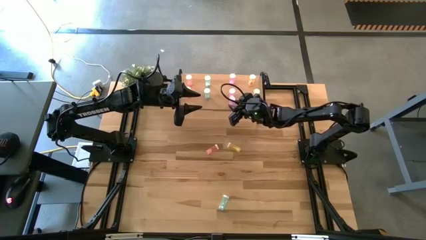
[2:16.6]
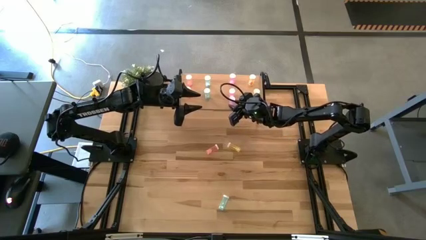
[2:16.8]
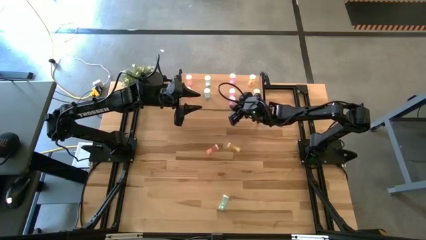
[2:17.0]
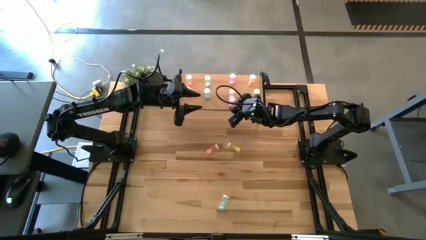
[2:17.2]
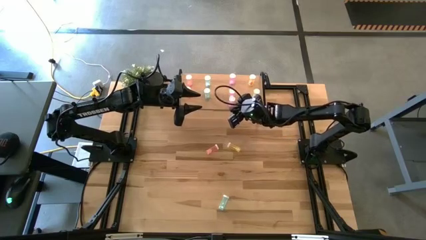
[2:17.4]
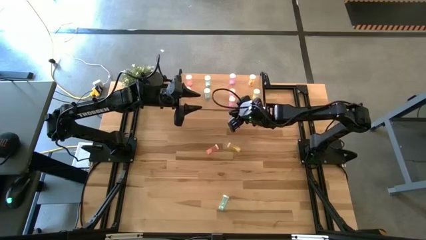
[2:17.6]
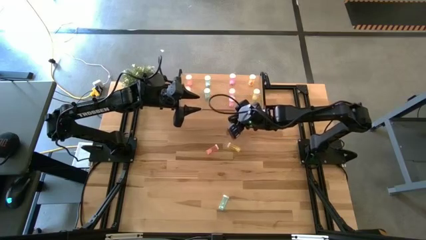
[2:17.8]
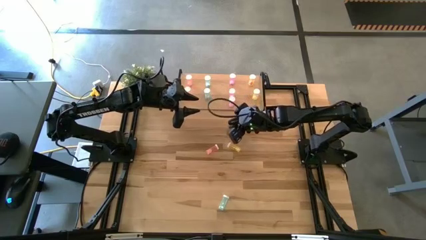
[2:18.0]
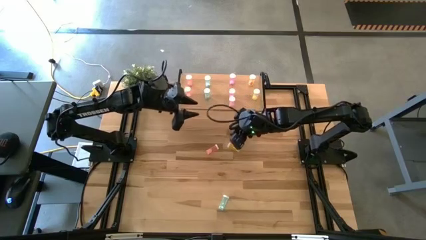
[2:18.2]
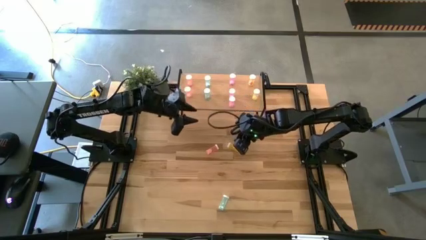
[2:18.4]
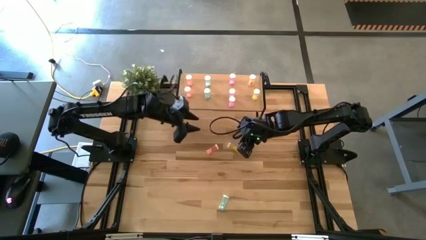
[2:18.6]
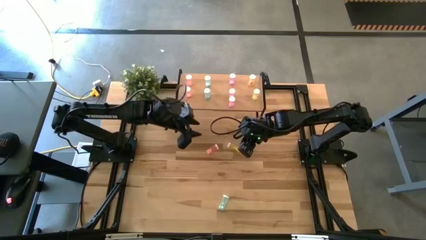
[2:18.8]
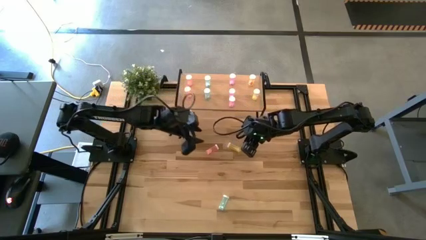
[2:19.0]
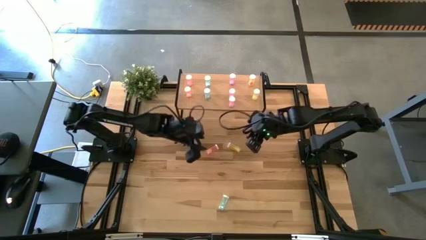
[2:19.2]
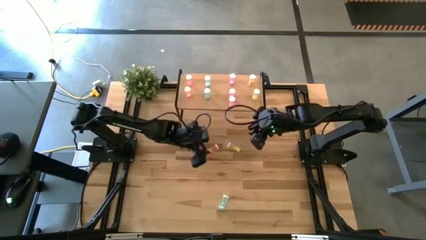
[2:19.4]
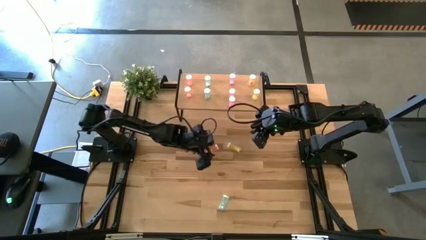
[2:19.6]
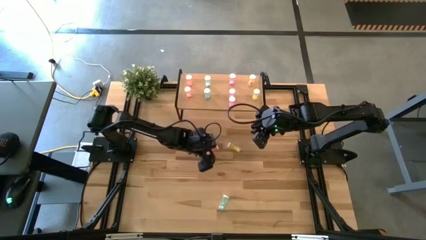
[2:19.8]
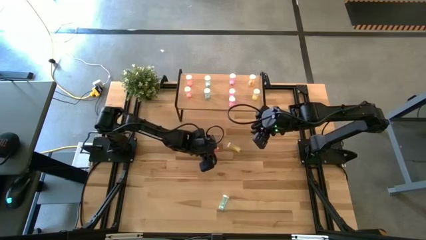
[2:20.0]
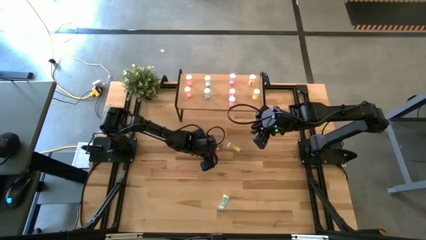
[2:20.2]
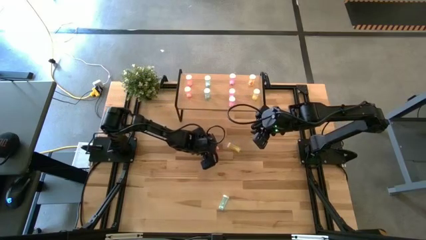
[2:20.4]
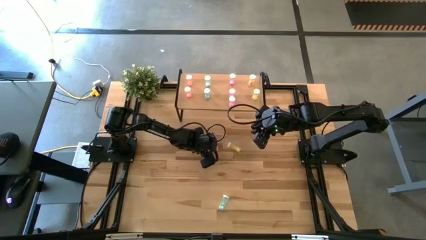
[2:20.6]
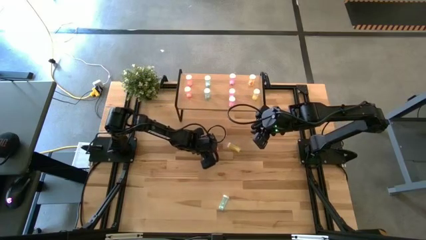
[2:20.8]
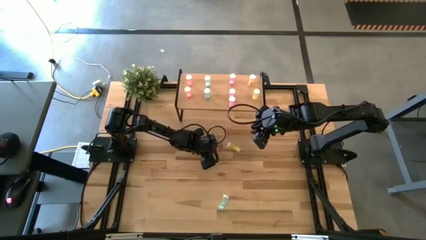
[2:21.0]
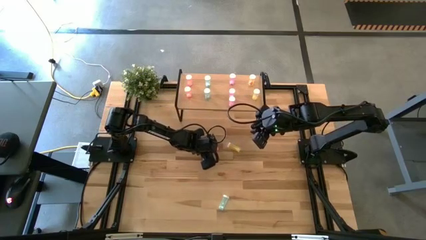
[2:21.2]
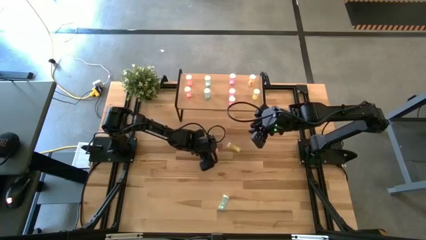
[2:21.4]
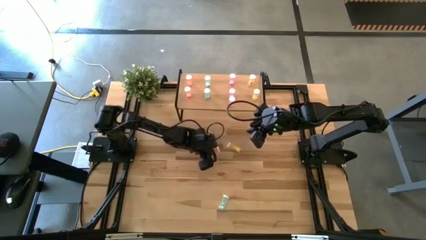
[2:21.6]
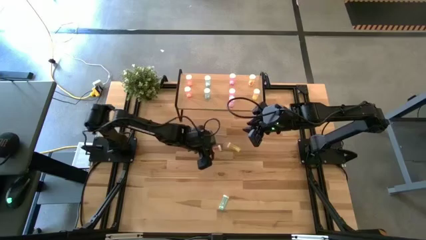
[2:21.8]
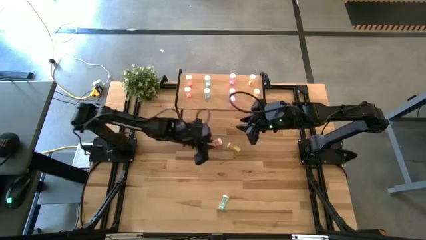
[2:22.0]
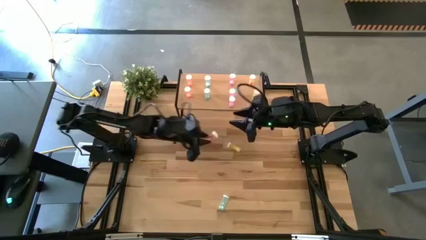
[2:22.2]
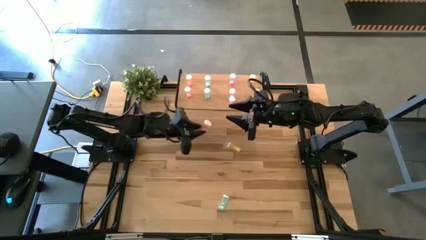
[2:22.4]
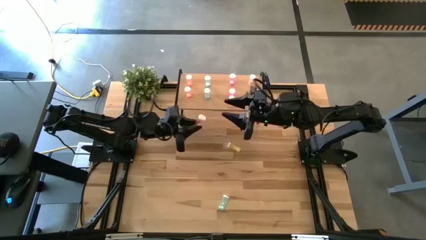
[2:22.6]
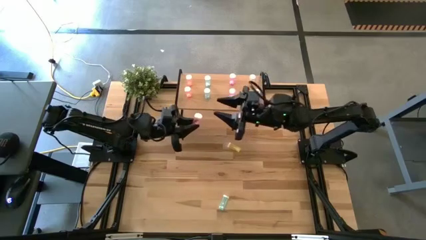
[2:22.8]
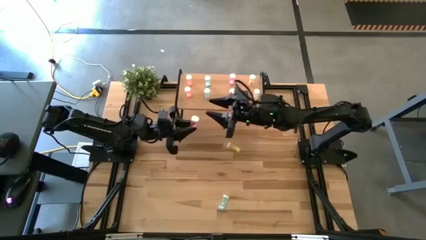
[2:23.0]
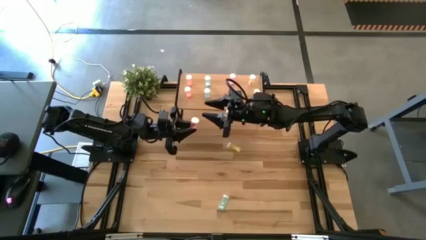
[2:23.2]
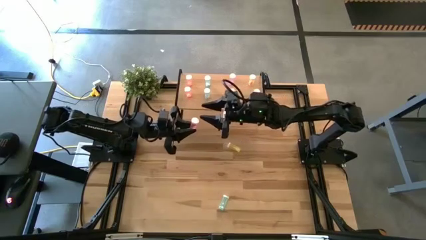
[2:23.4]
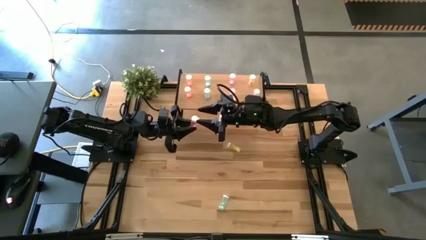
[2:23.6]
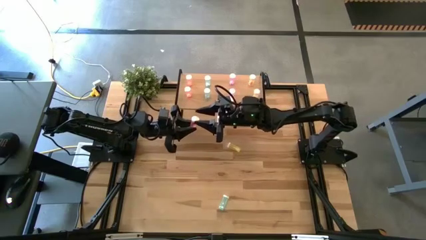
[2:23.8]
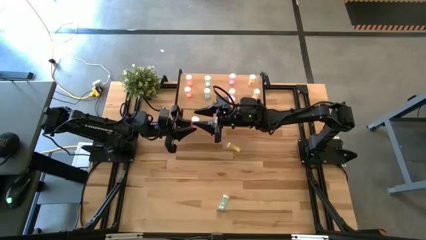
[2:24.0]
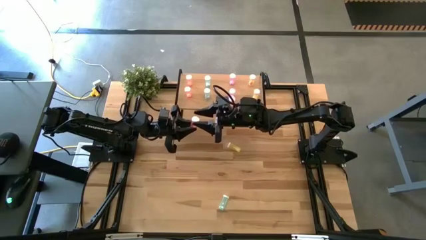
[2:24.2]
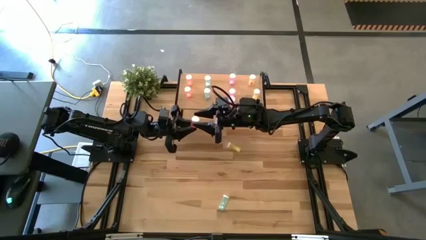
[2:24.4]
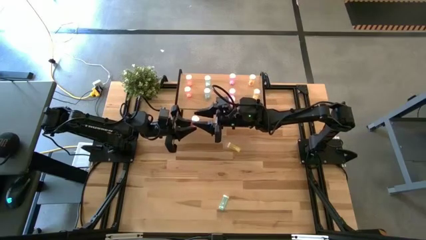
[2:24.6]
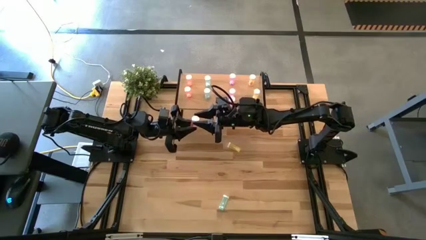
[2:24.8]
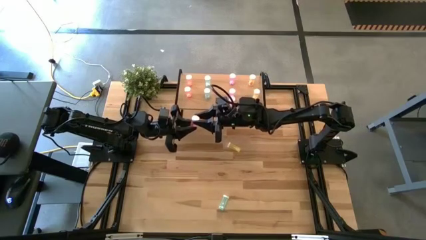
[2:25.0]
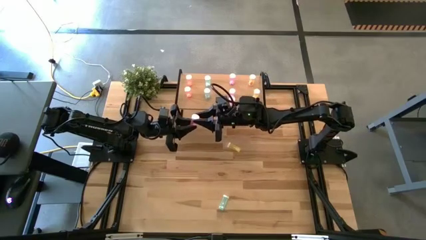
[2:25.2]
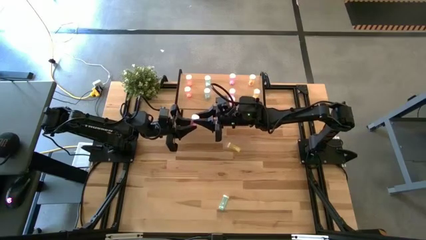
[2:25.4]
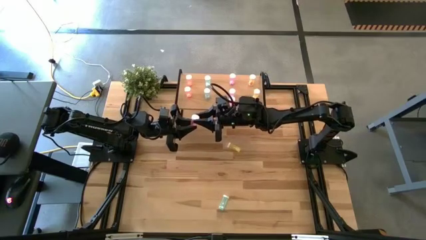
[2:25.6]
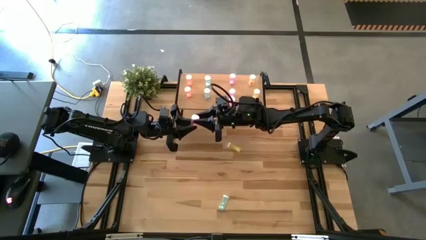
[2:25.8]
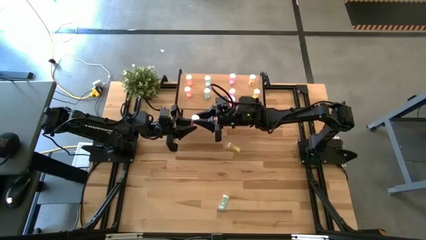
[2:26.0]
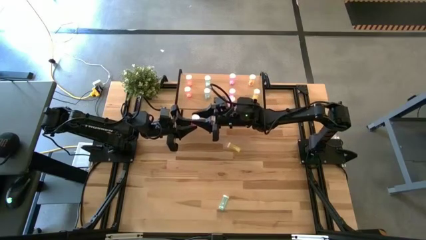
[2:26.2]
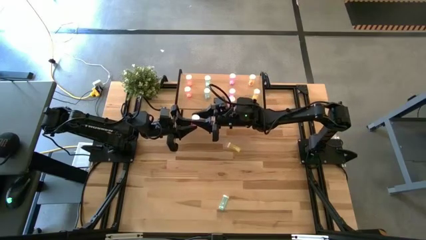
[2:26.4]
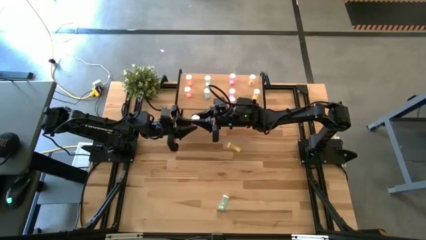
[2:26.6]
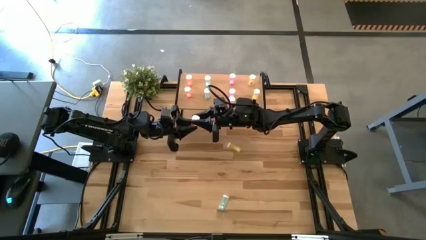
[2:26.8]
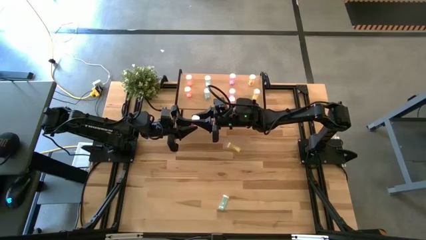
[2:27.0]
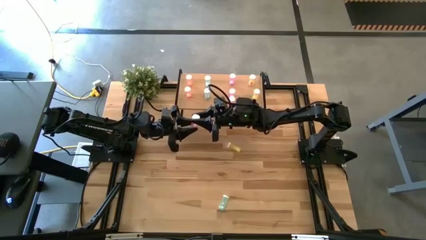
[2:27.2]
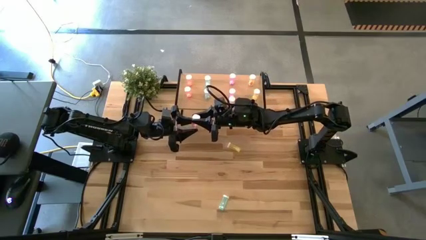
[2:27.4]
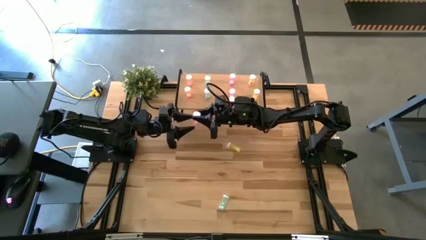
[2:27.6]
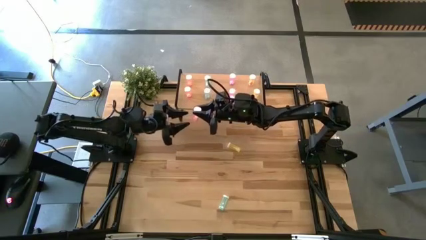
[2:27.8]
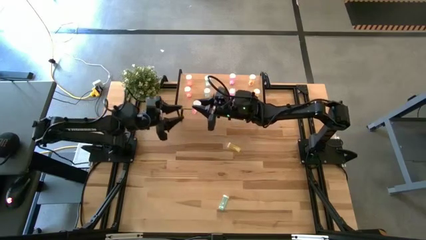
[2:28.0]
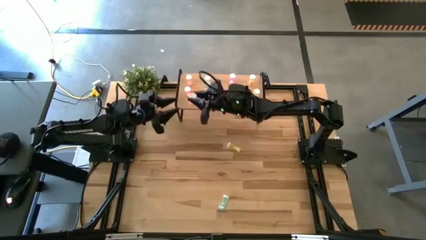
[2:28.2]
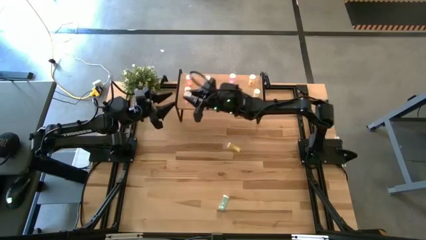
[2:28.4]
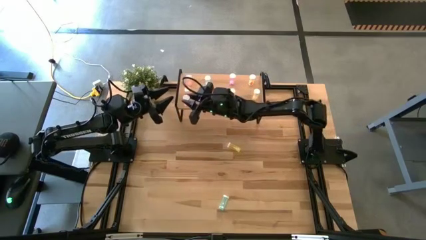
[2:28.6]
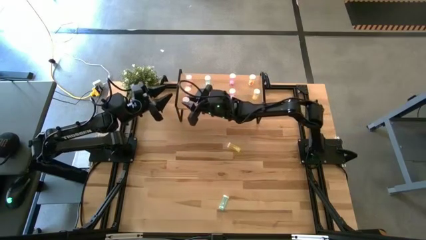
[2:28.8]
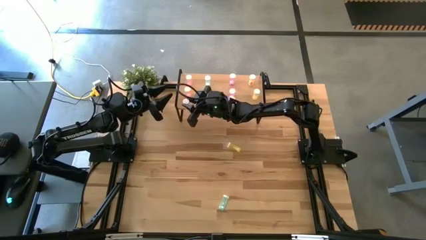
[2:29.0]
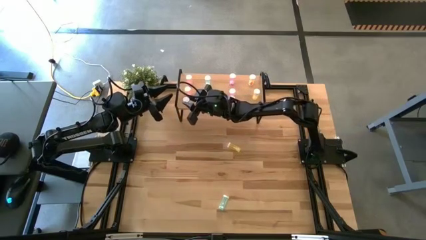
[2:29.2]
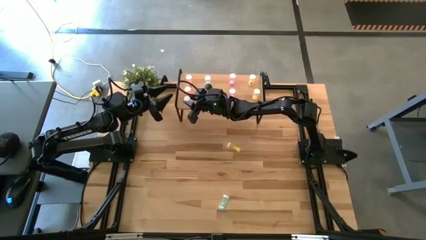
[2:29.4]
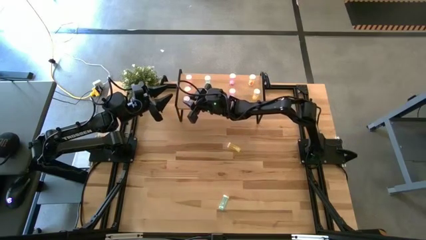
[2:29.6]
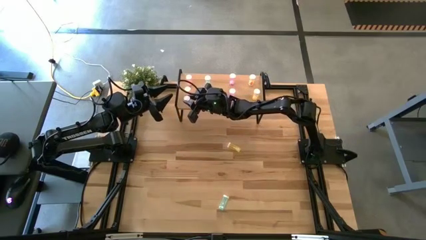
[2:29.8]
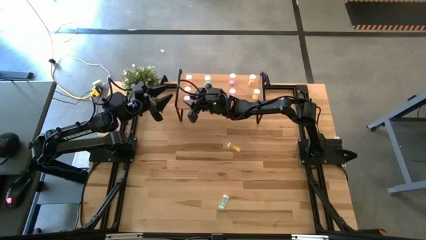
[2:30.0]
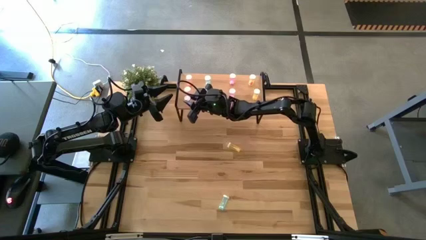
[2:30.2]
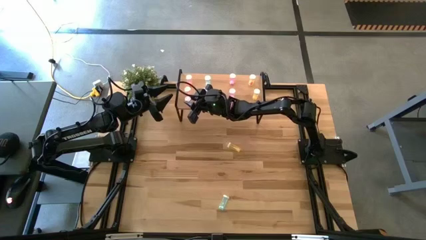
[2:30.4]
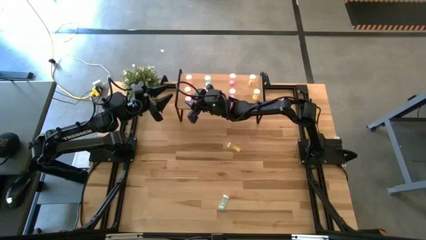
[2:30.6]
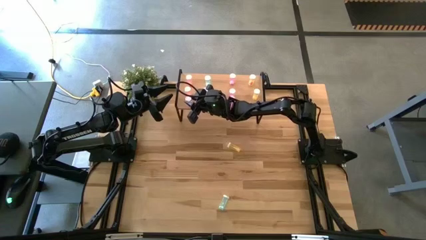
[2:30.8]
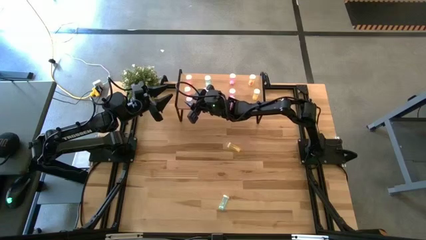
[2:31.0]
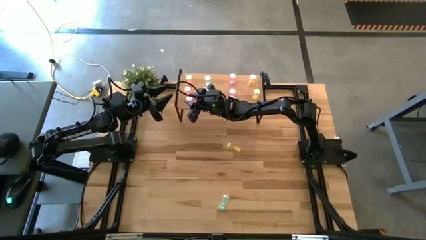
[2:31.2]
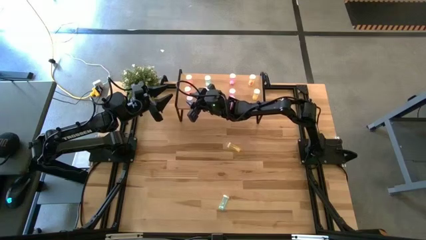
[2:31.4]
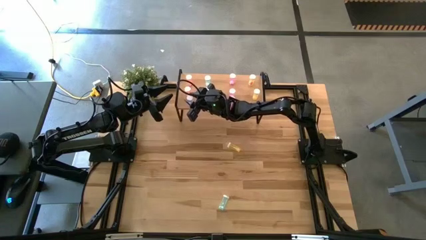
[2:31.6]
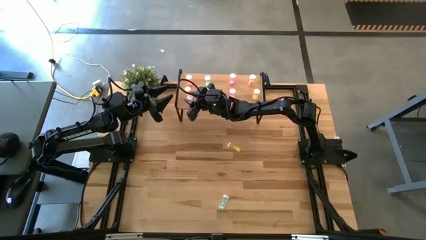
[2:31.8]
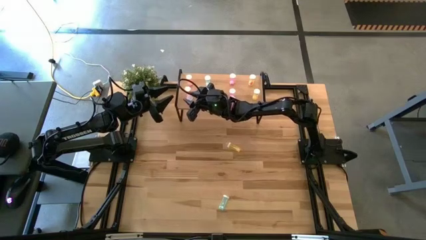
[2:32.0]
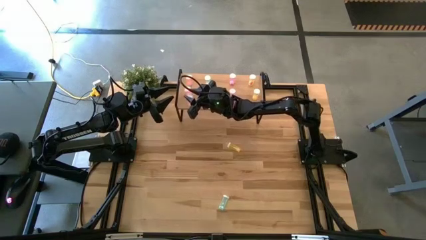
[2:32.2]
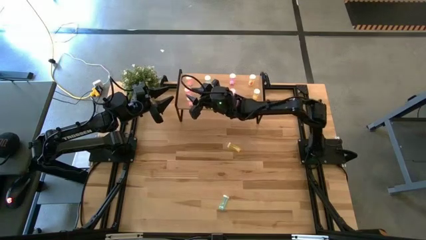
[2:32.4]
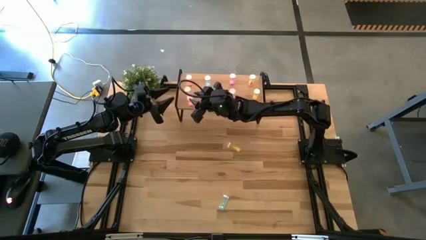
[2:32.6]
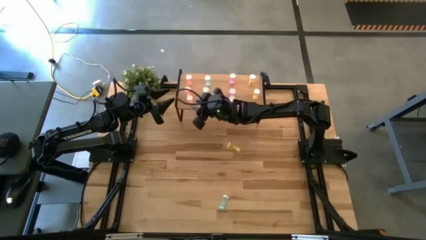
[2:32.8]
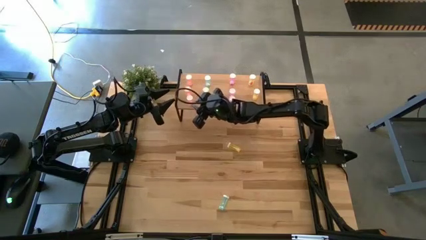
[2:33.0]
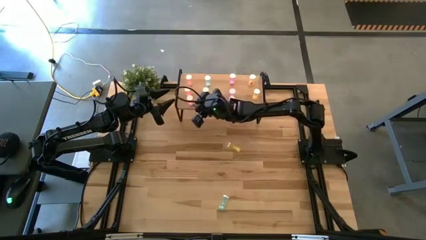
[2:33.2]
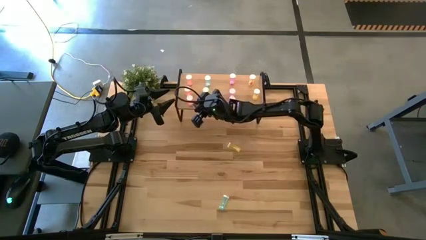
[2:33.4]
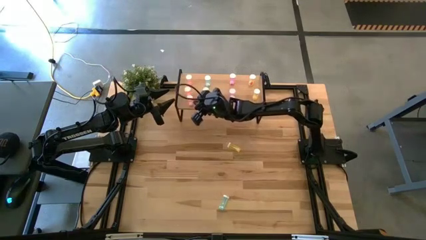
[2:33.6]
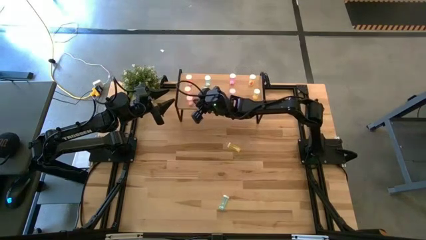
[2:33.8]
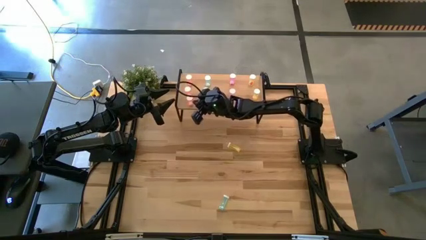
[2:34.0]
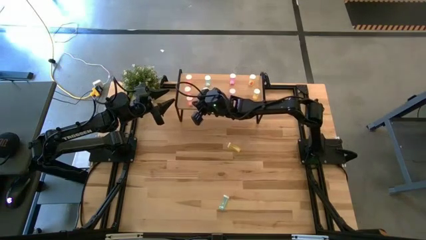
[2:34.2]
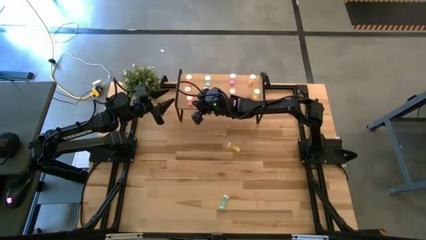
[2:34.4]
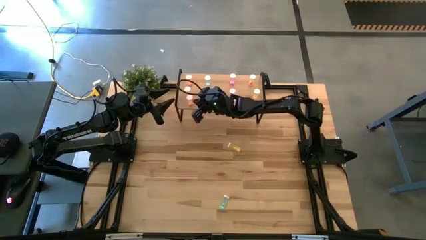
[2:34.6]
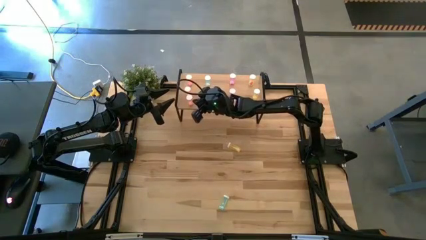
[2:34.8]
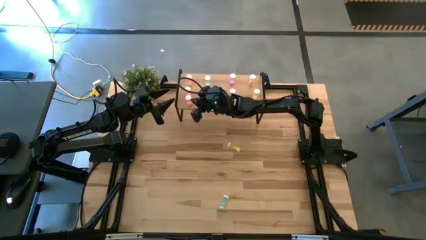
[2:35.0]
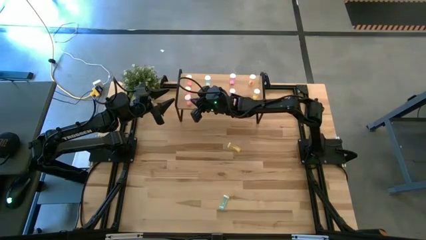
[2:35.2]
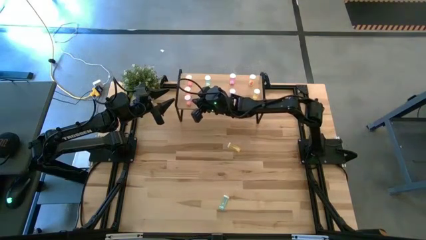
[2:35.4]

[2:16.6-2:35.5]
Task: Pick and place medicine bottles onto shelf by color
Put the pink pill bottle on the shelf aligned with the other pink pill bottles
